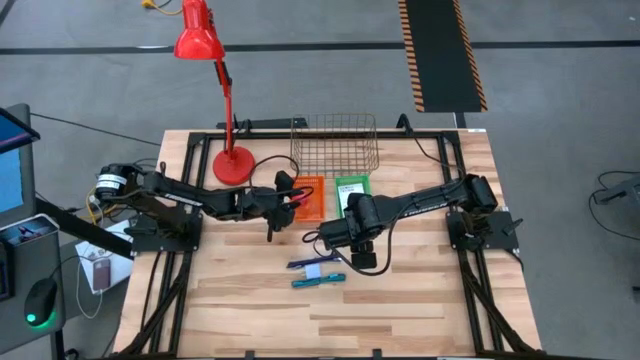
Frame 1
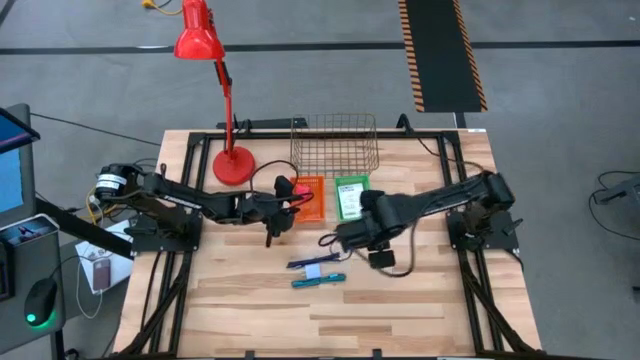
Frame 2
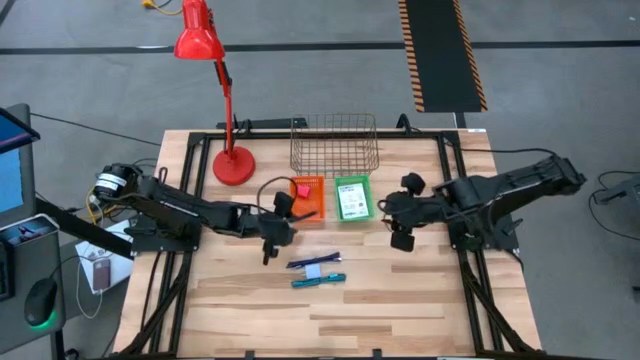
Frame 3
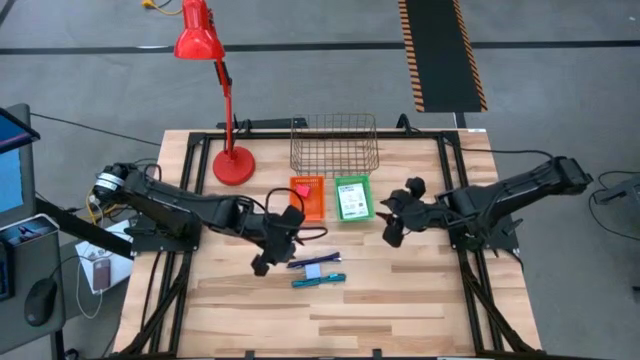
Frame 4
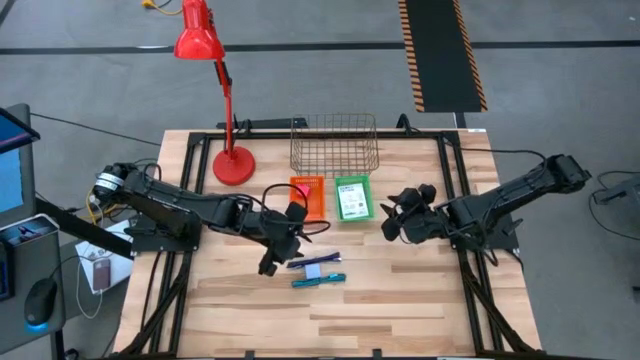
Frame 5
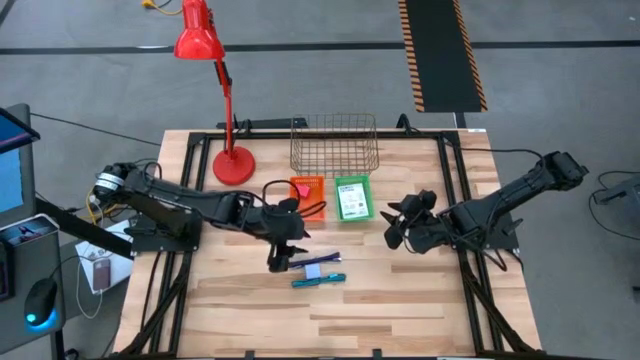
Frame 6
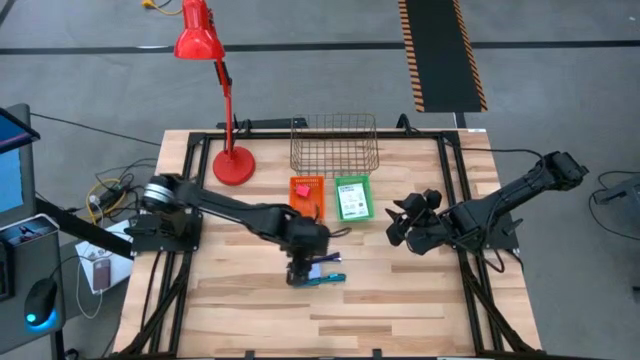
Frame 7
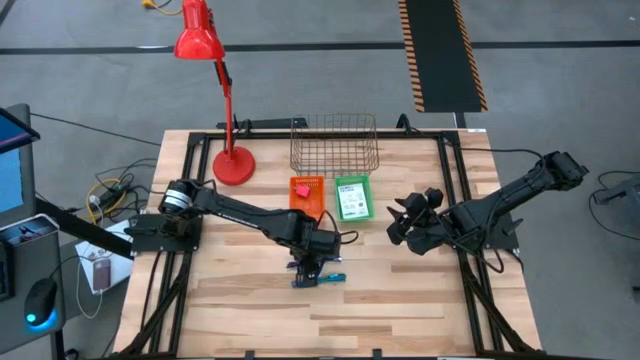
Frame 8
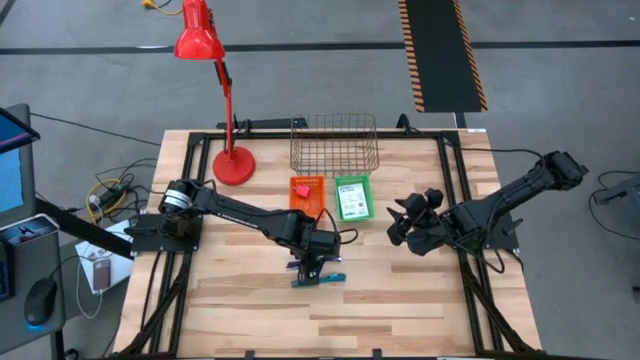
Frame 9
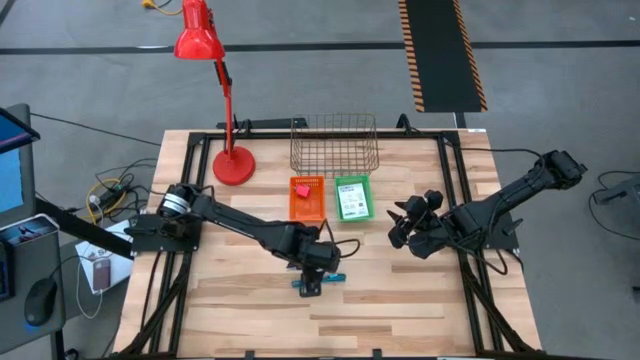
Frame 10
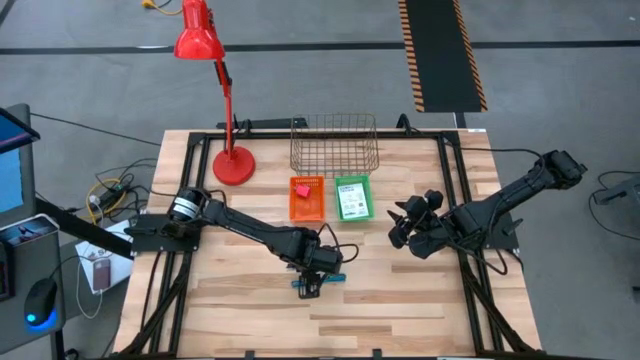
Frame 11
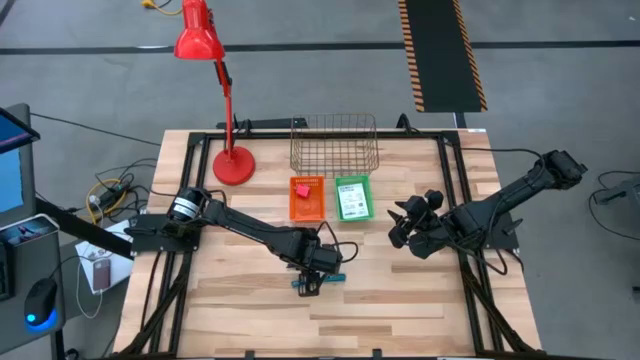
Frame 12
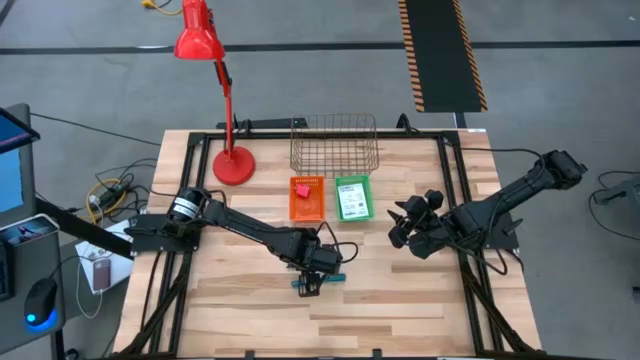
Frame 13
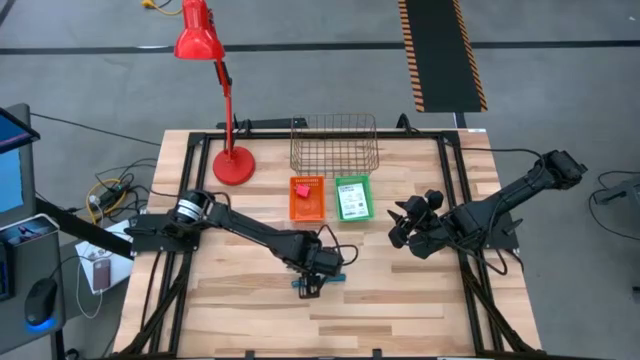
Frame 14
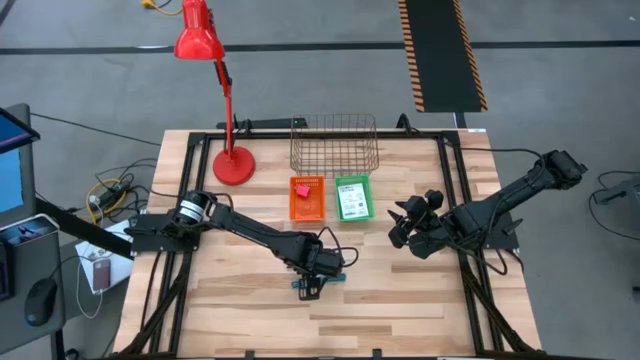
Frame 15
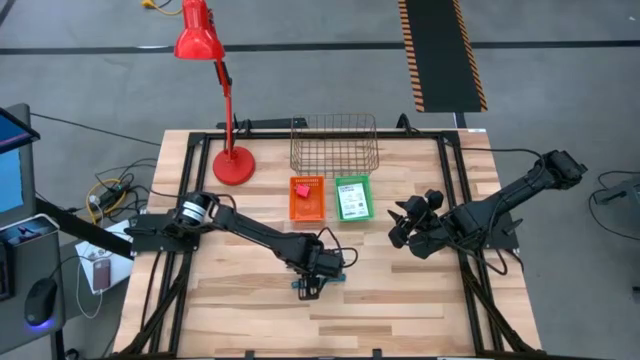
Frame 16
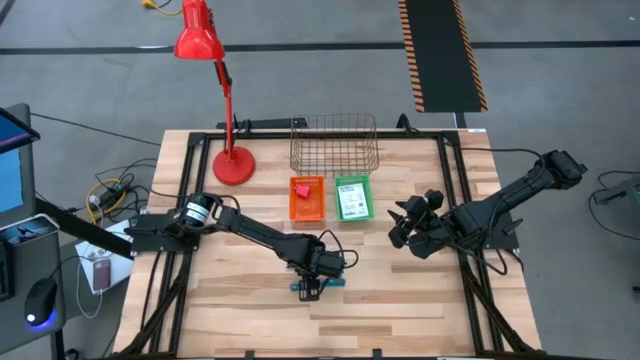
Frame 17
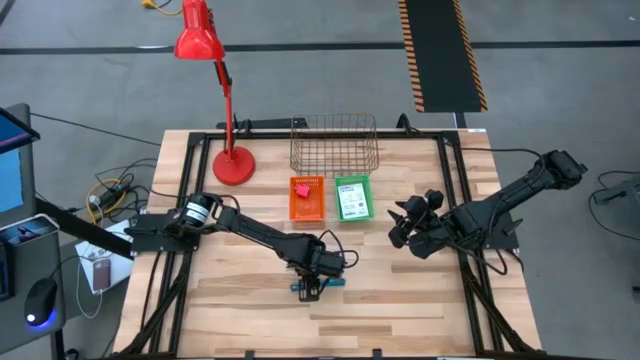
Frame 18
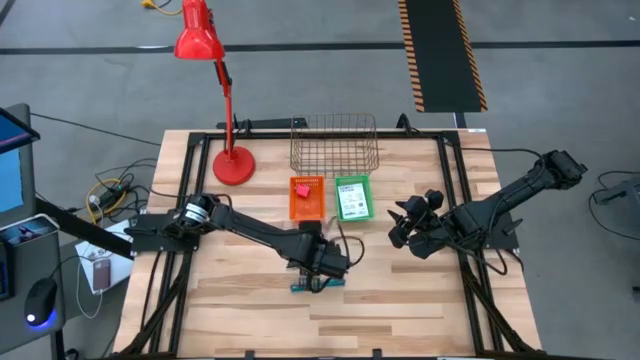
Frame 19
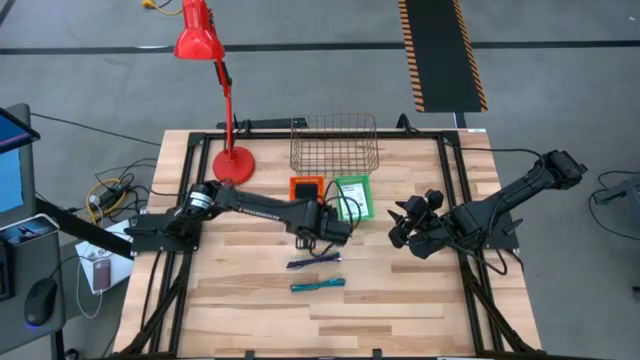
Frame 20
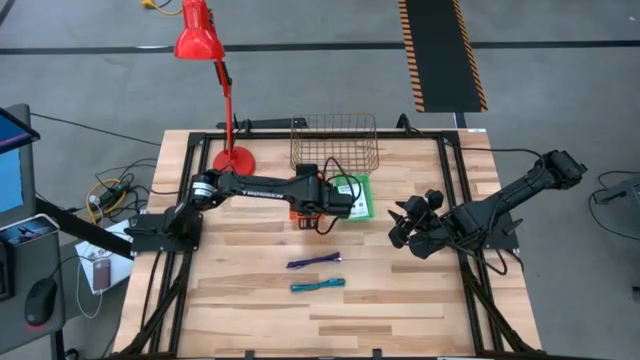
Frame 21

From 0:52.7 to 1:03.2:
Task: Pick and place items into bin
Put the white charger adapter into the orange bin

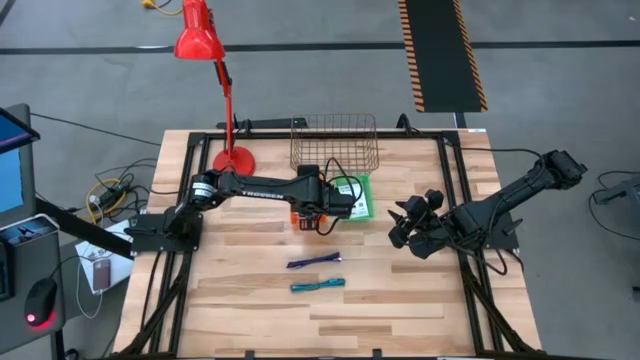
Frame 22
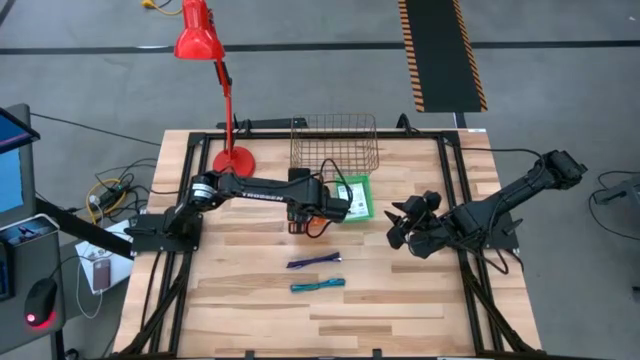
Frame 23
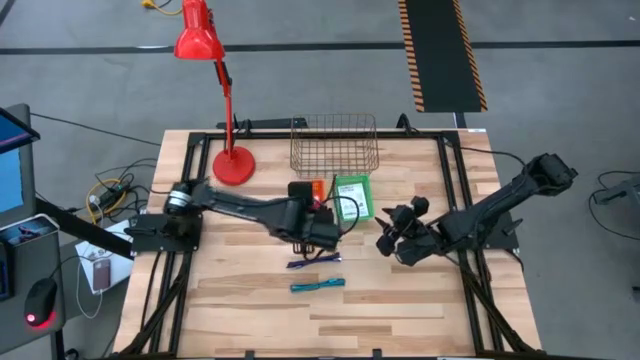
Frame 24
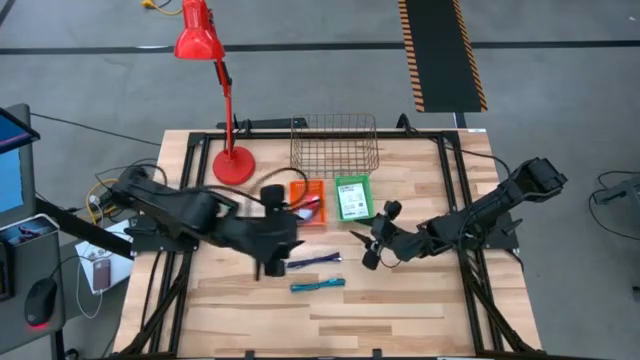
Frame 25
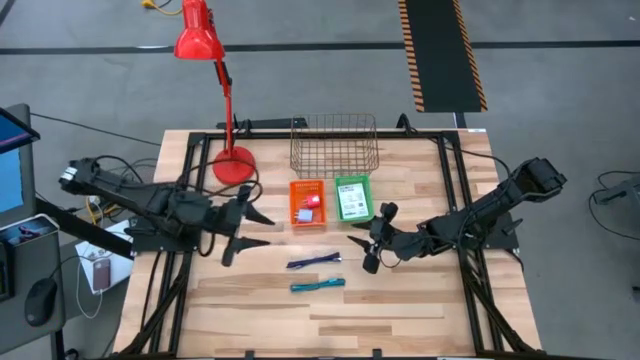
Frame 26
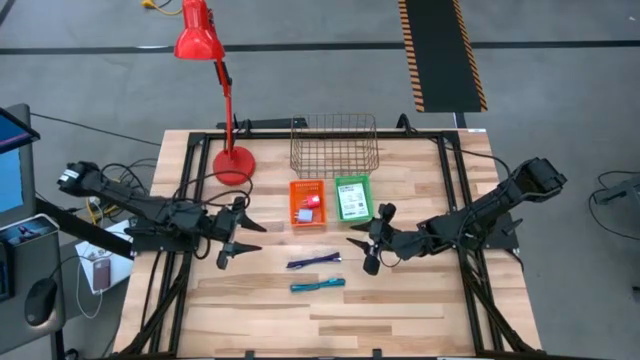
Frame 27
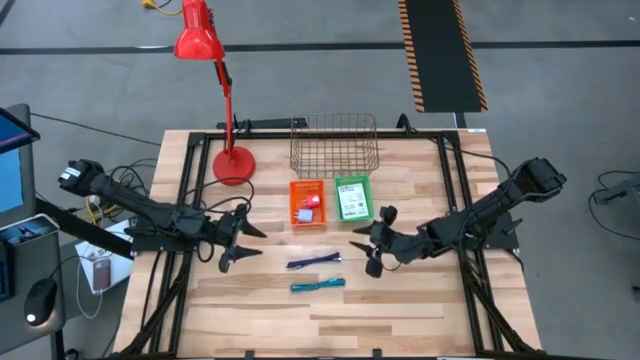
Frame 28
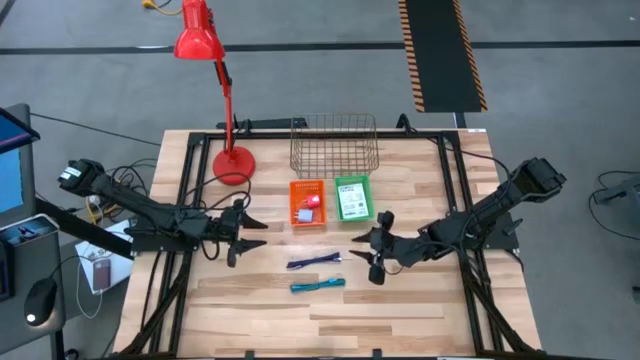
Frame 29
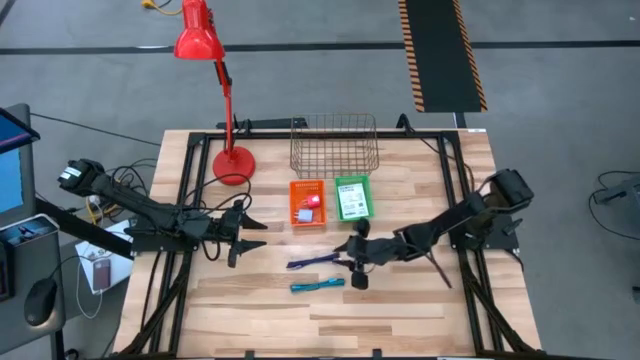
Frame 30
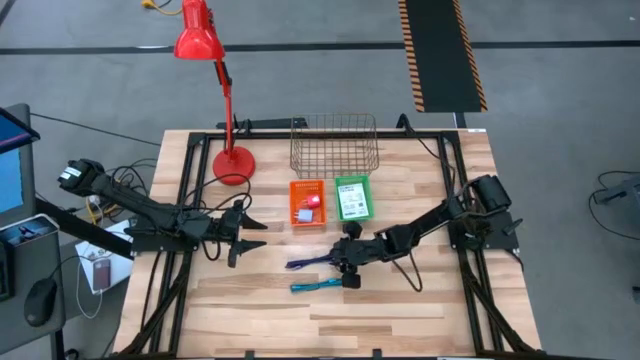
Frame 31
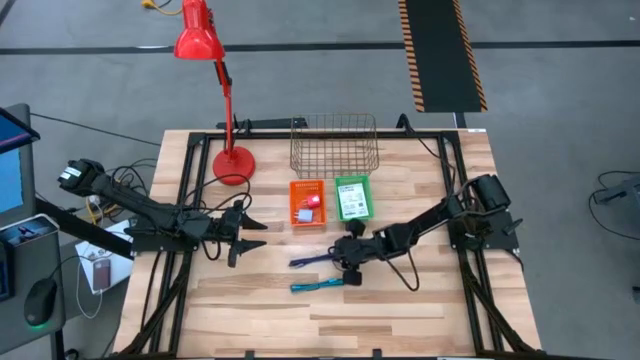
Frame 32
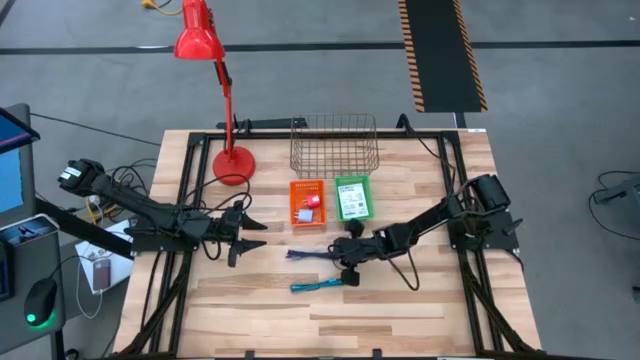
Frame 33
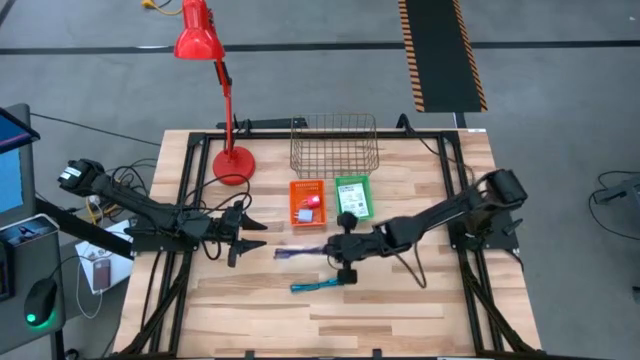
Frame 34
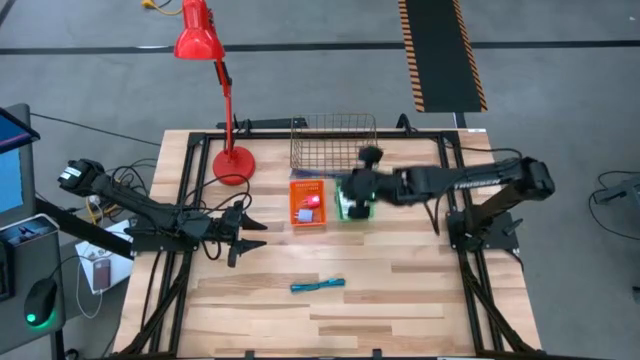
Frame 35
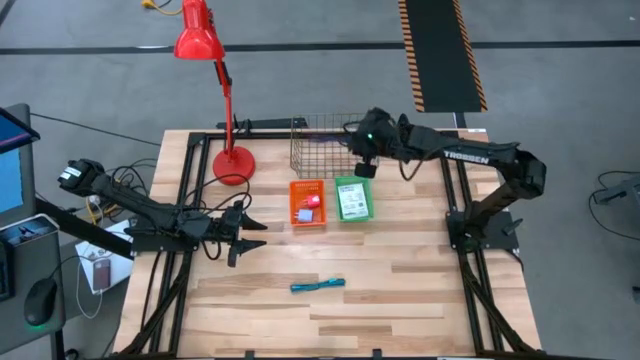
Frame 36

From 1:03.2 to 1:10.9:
Put the dark blue charger cable into the gold wire basket

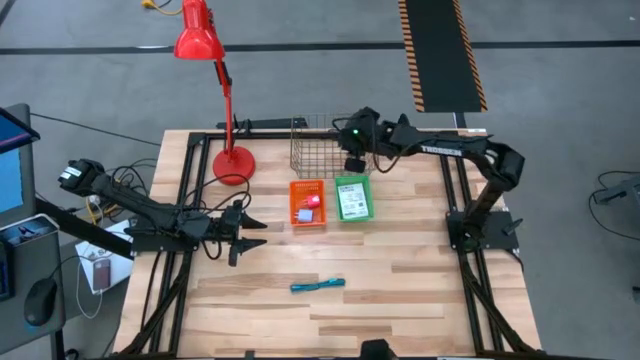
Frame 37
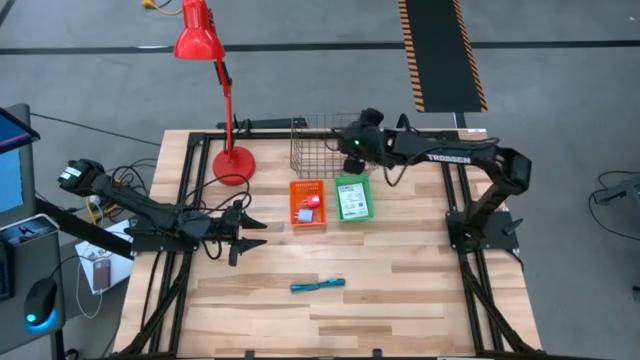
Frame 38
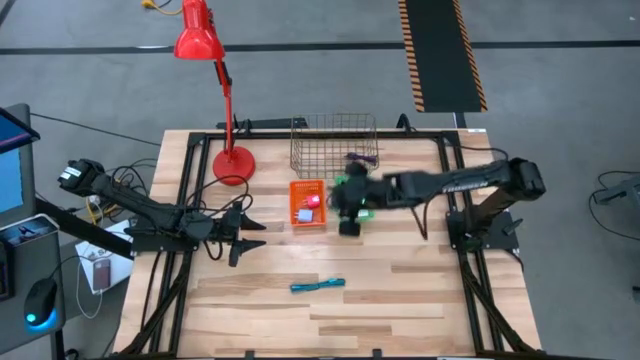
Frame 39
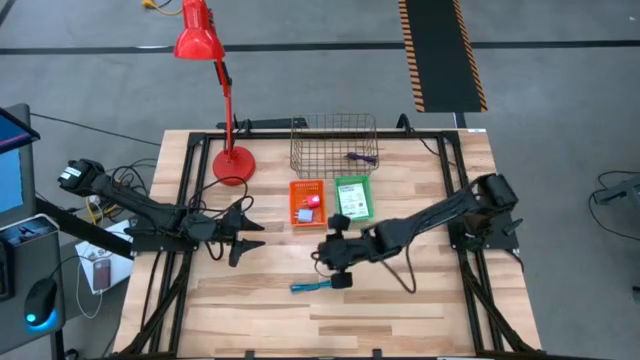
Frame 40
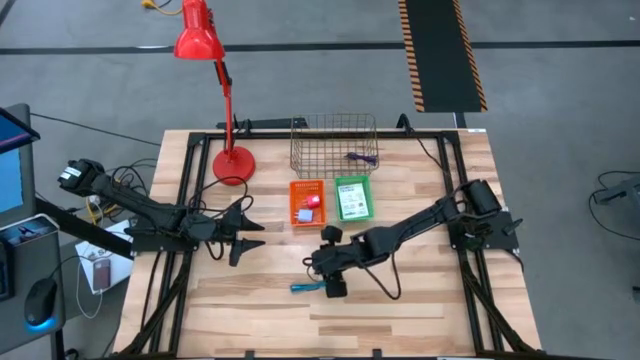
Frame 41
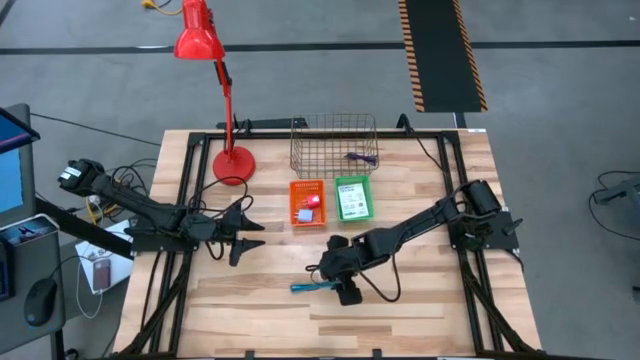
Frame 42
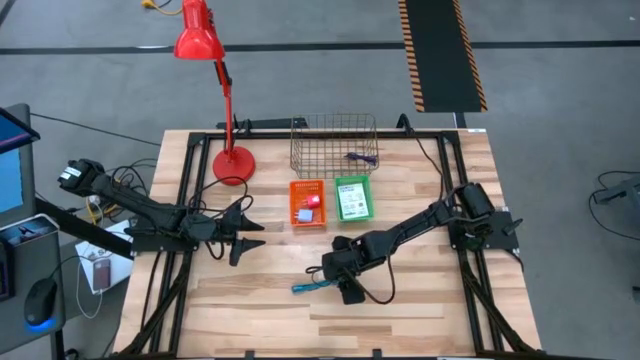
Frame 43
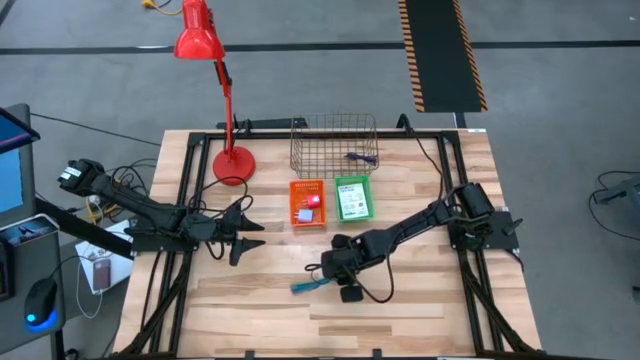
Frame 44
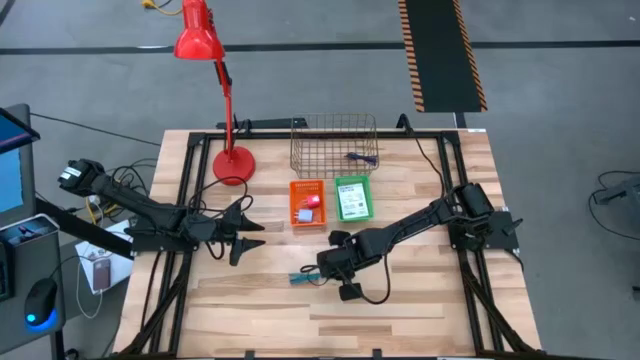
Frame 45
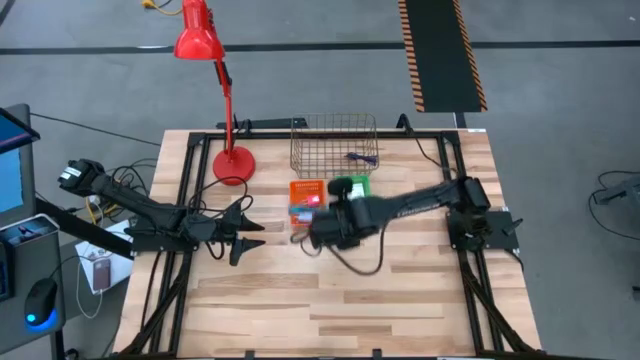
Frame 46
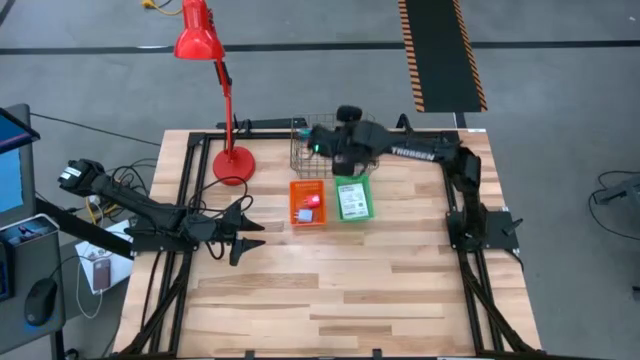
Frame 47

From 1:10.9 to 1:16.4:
Put the blue charger cable into the gold wire basket
